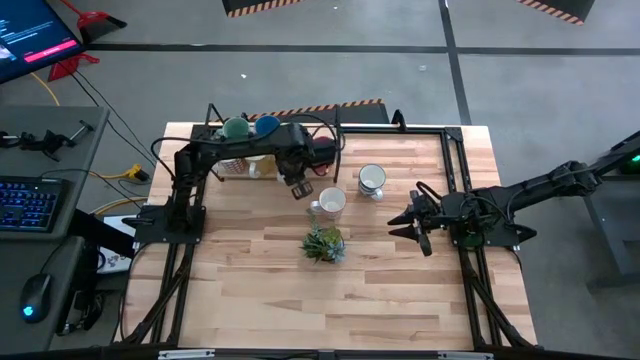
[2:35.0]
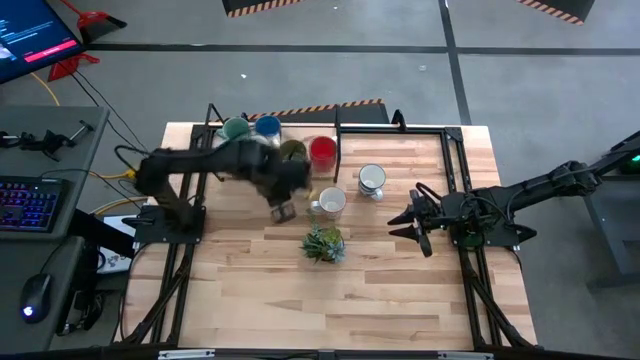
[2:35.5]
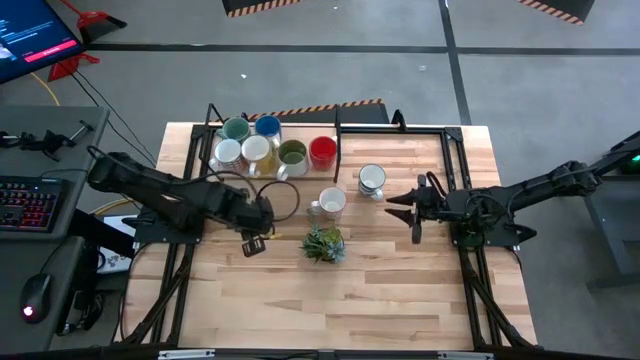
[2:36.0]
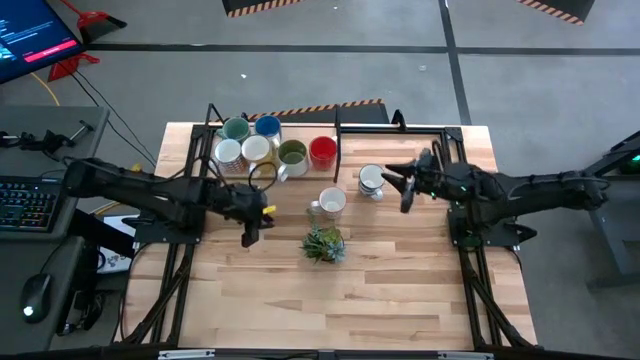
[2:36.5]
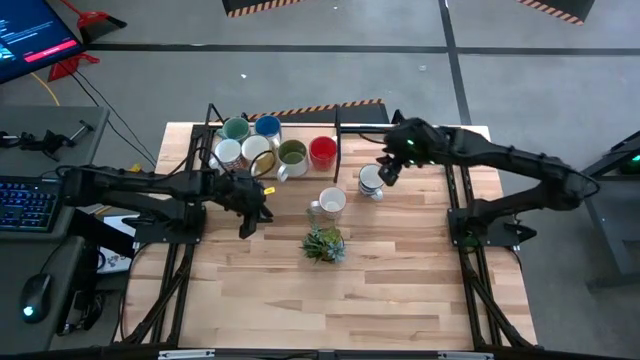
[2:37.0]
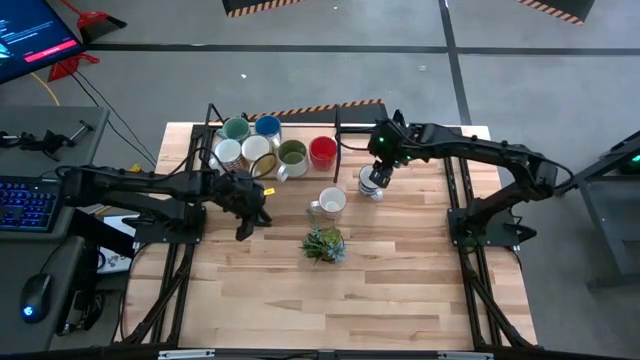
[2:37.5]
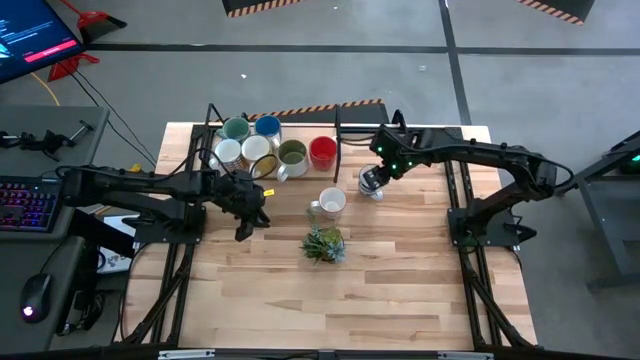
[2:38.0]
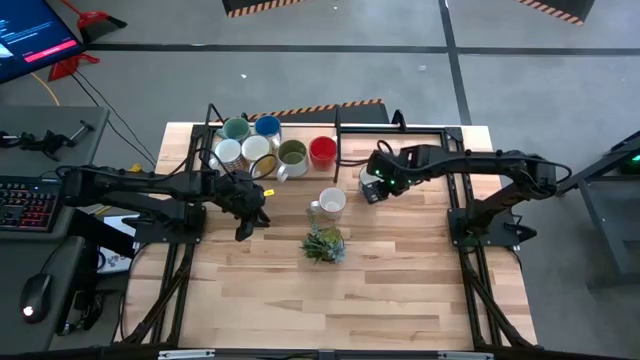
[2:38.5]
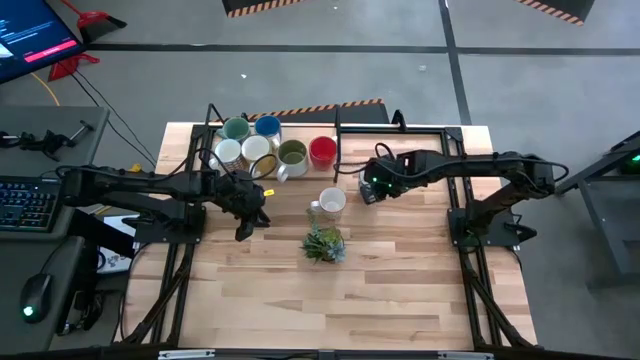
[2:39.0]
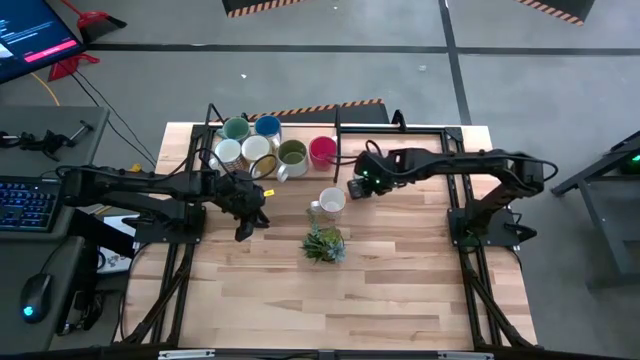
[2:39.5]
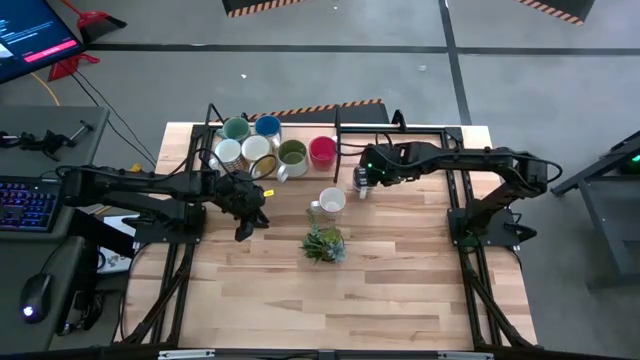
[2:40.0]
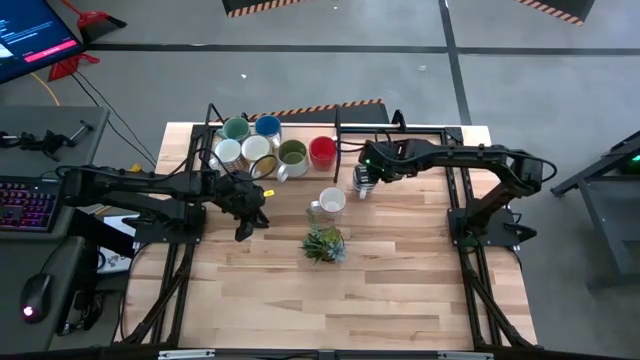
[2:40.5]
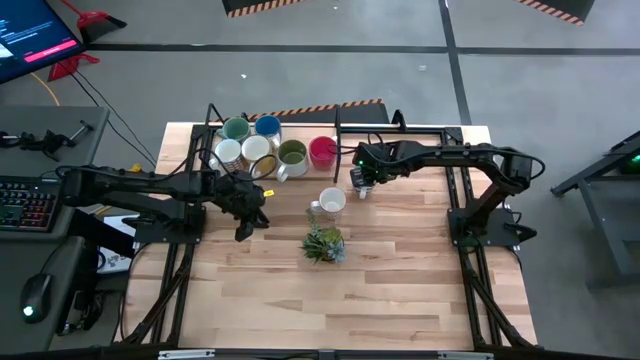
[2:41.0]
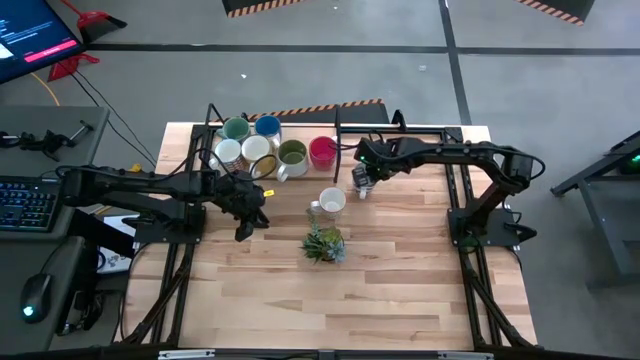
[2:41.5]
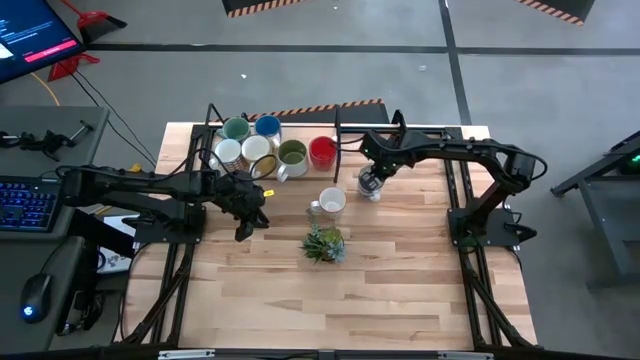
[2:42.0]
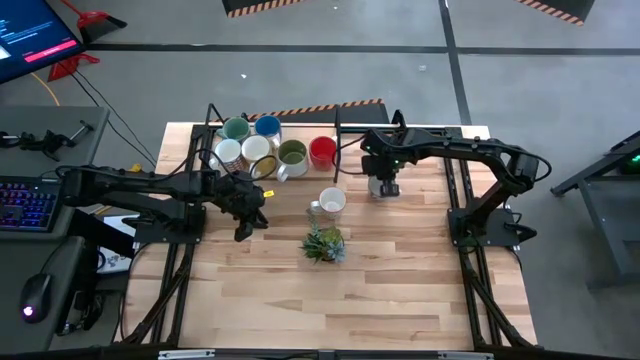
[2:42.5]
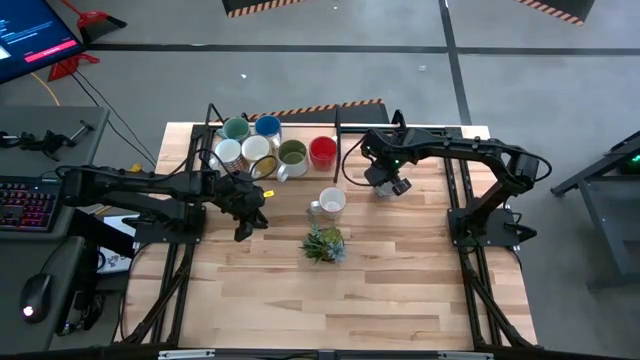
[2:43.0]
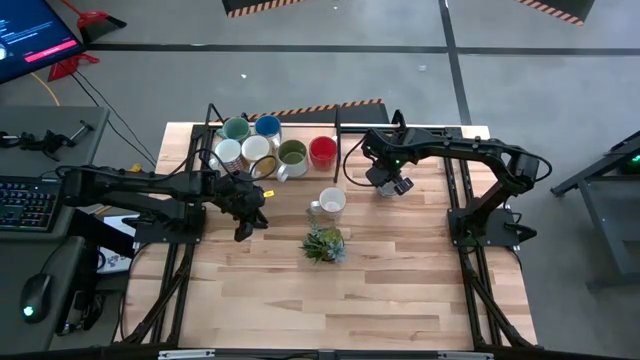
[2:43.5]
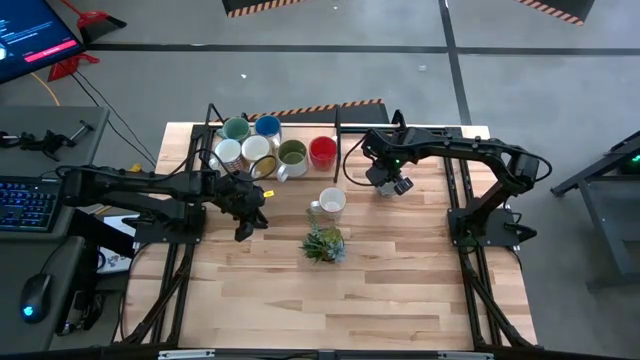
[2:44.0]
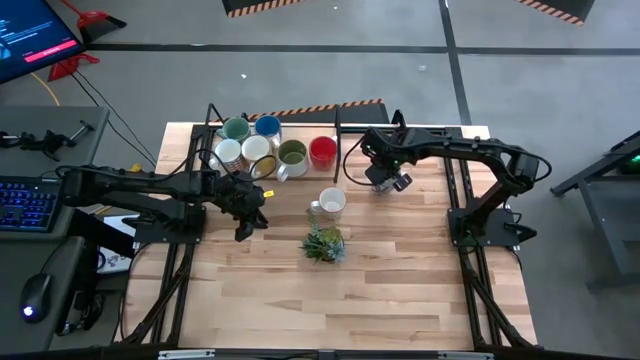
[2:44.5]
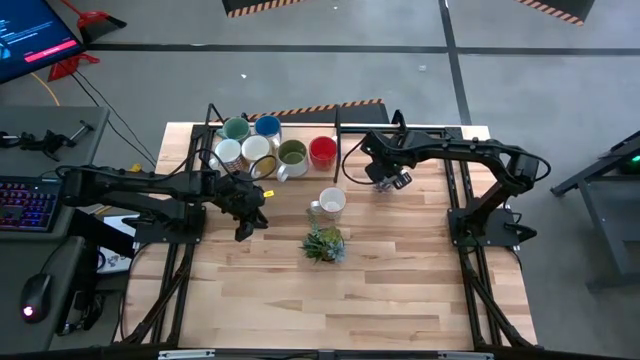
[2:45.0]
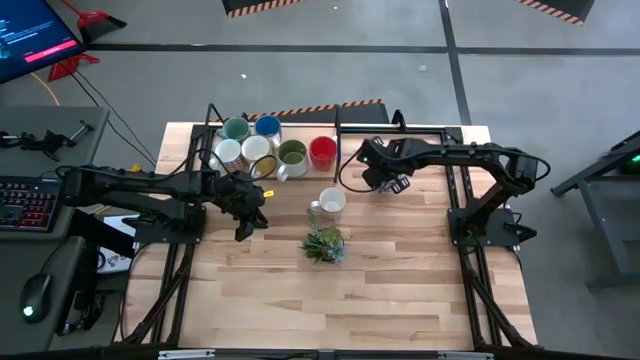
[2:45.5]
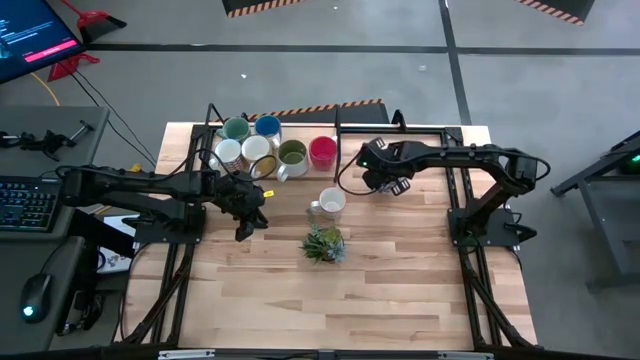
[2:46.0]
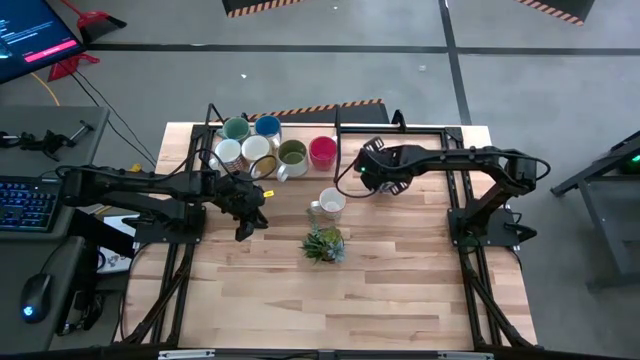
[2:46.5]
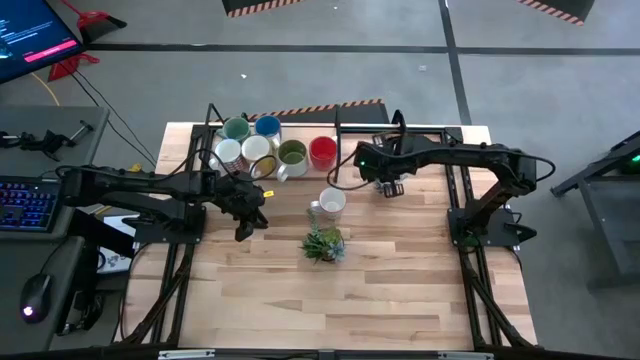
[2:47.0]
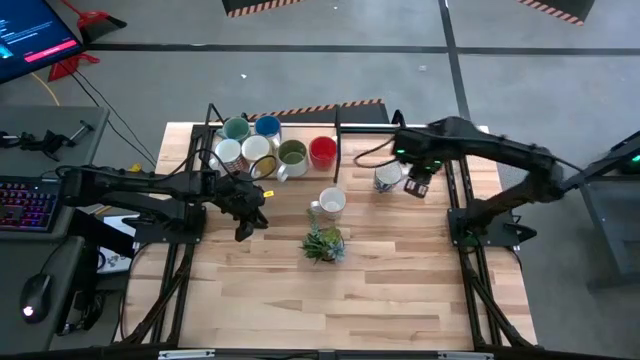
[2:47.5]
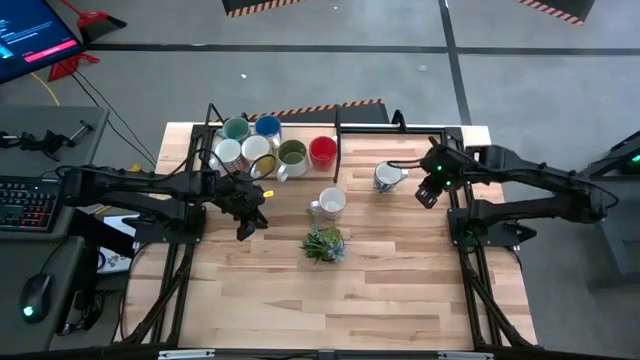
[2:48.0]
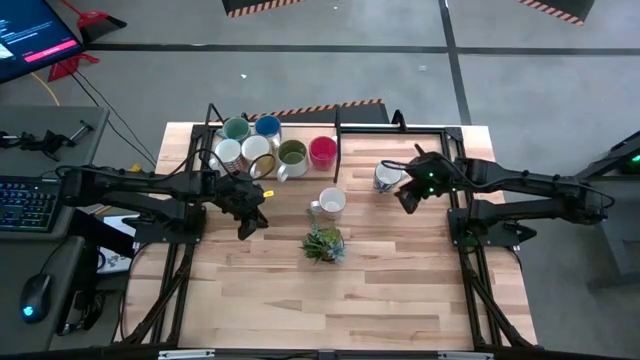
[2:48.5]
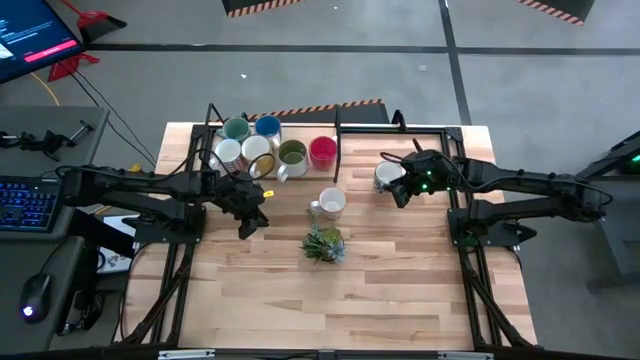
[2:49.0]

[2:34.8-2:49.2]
Task: Place coffee mugs
Put the blue patterned mug on the shelf

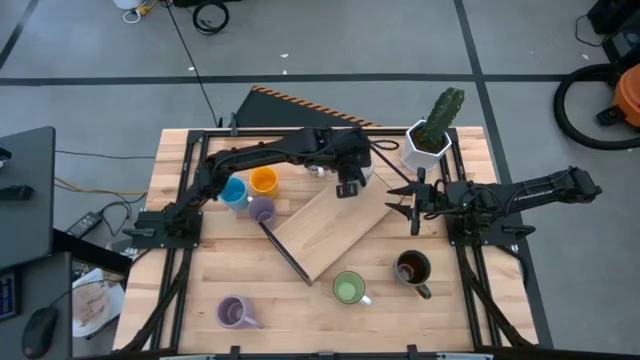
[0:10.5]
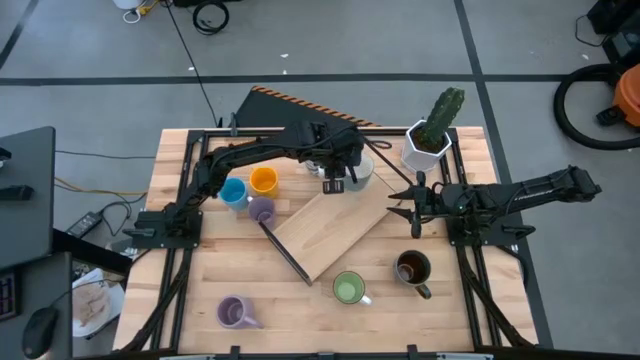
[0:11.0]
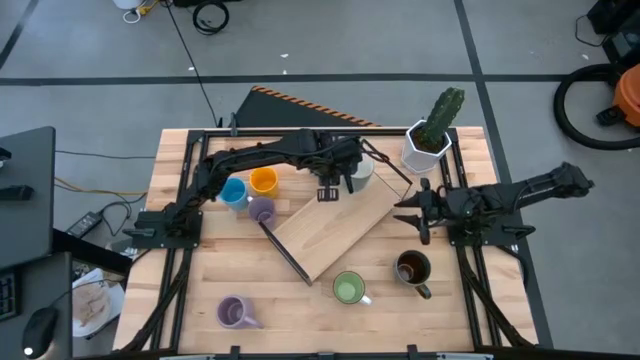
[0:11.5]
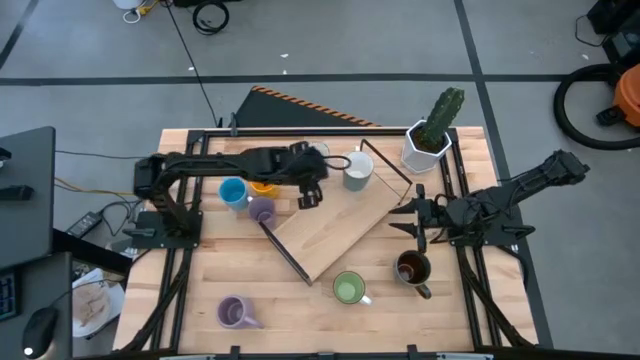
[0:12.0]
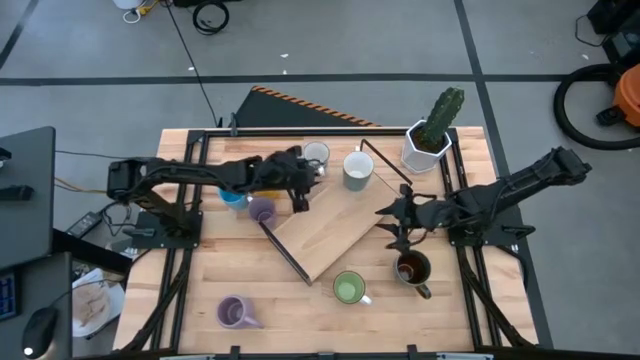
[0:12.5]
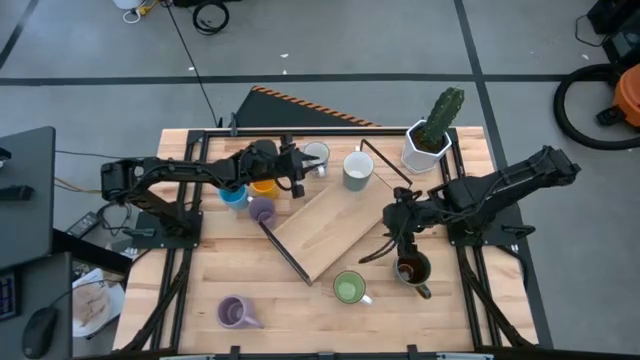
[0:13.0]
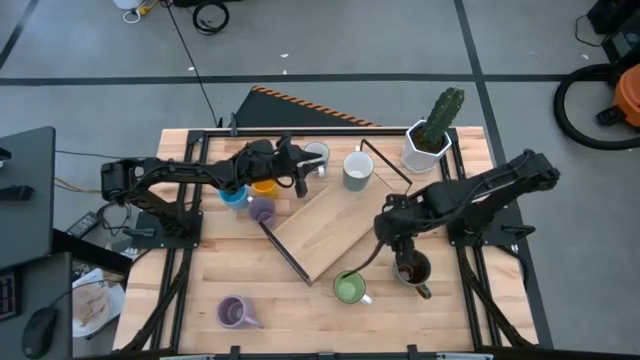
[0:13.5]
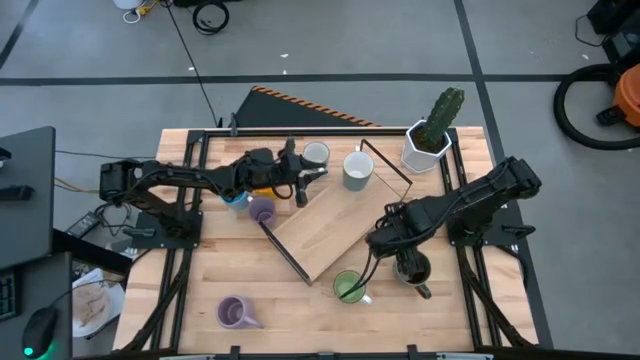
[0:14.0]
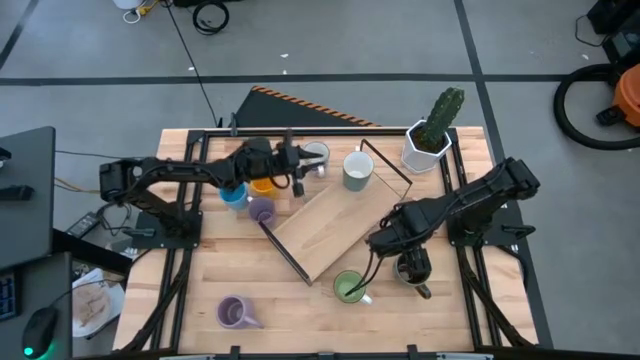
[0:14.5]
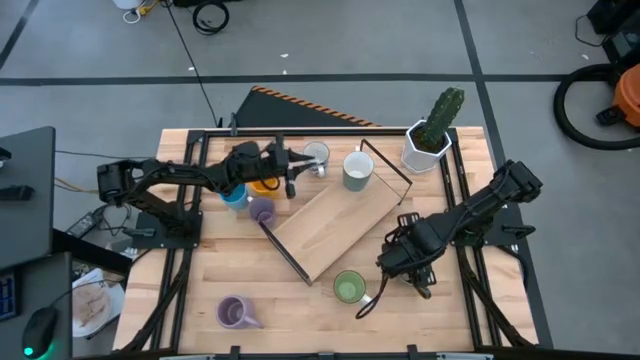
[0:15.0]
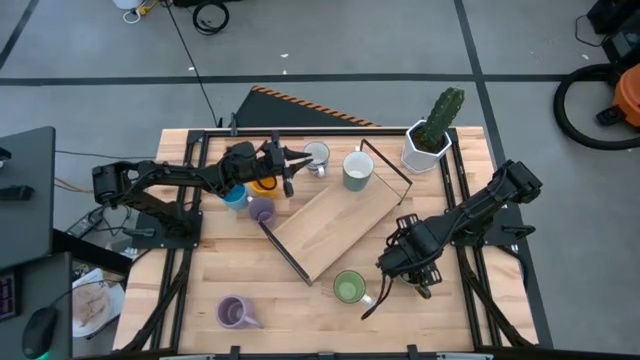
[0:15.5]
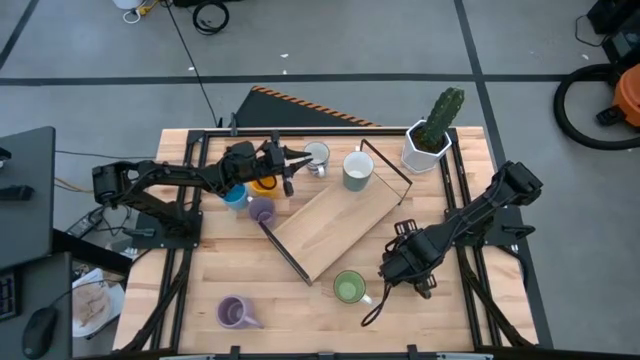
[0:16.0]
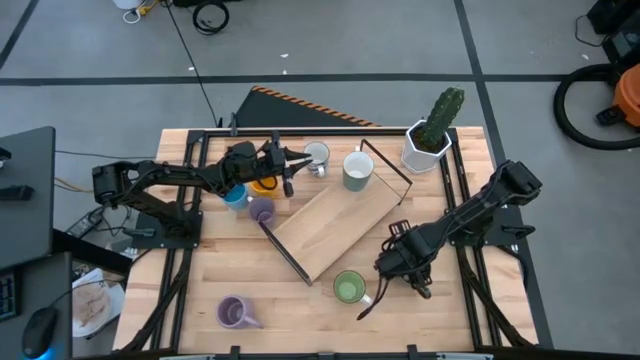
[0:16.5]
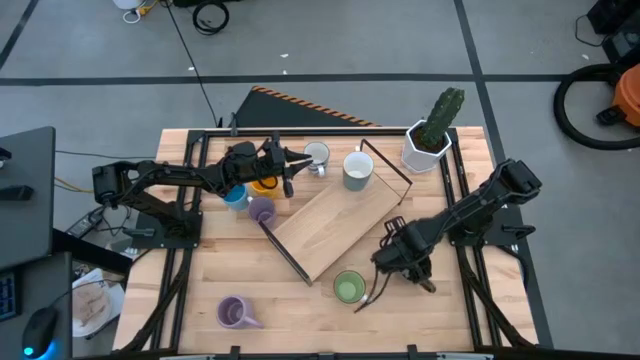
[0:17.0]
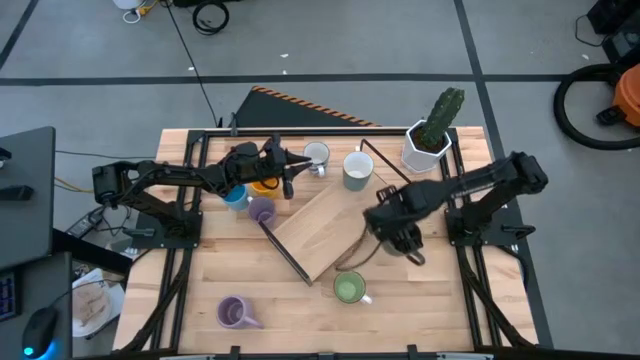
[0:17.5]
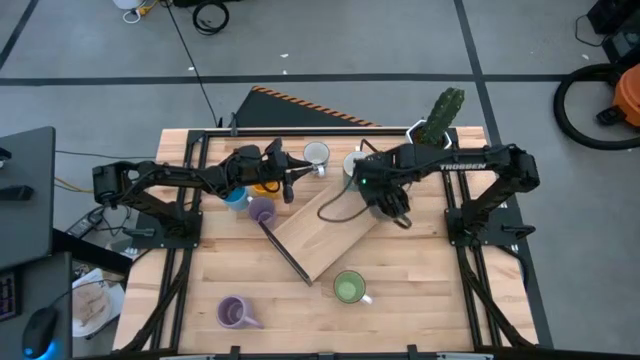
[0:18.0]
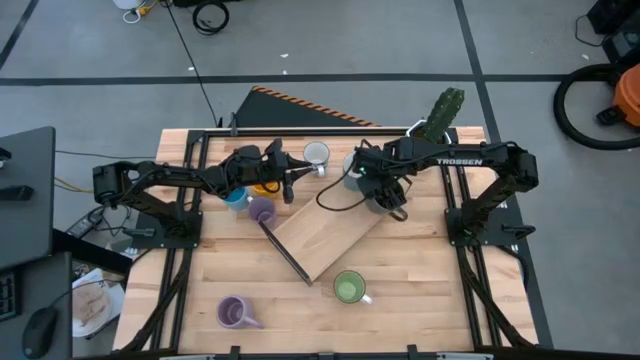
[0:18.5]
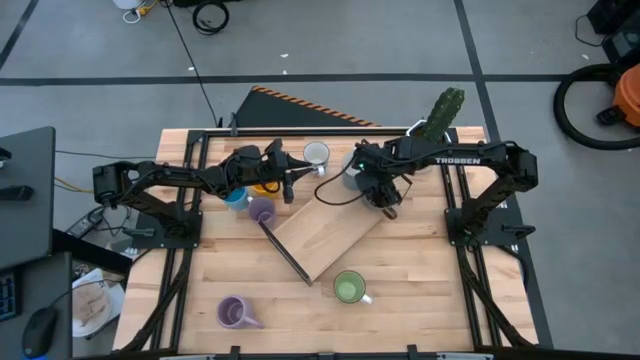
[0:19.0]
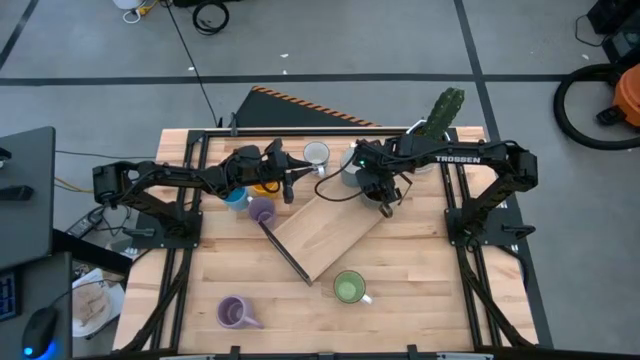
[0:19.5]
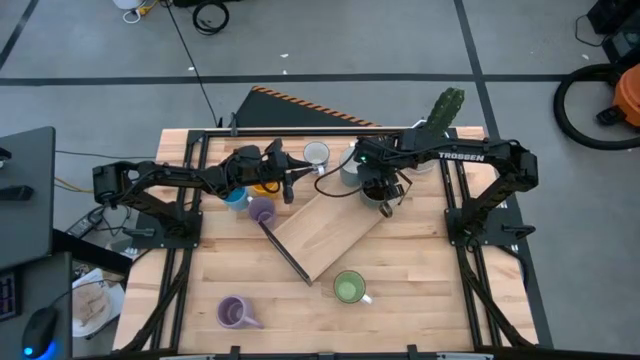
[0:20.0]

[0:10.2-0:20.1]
Task: Place coffee mugs
Put the dark blue mug on the shelf
